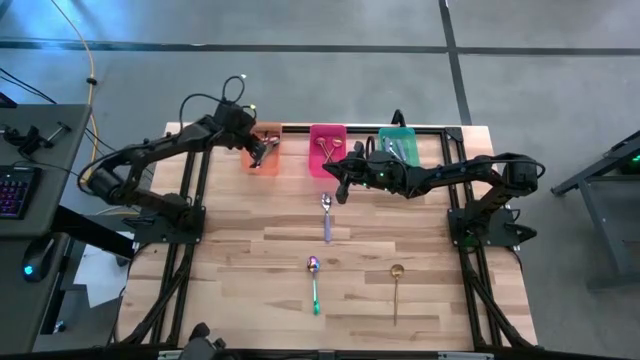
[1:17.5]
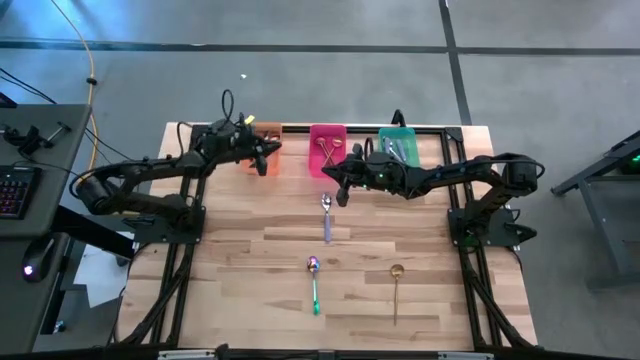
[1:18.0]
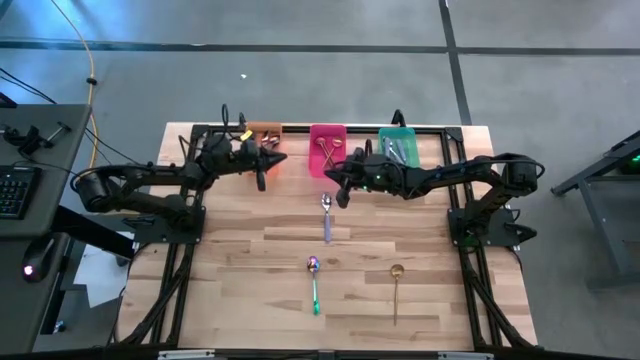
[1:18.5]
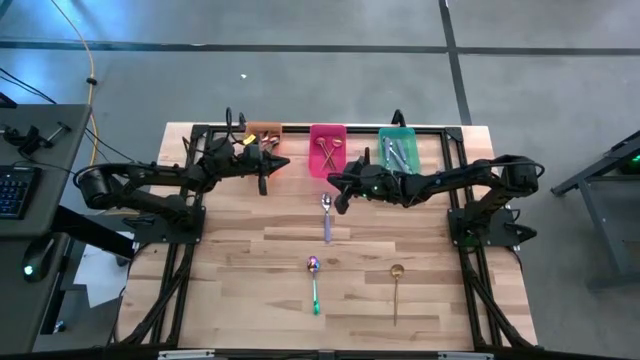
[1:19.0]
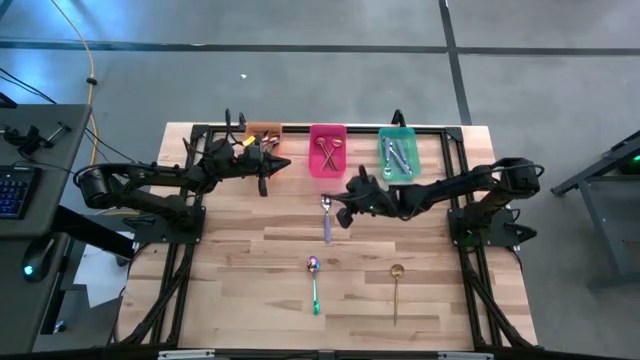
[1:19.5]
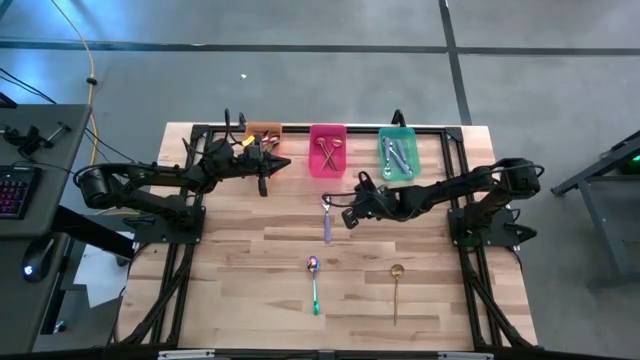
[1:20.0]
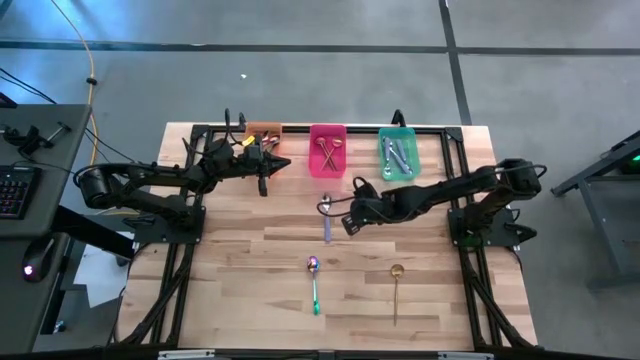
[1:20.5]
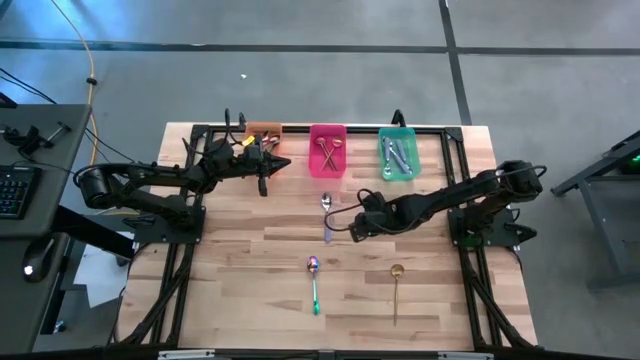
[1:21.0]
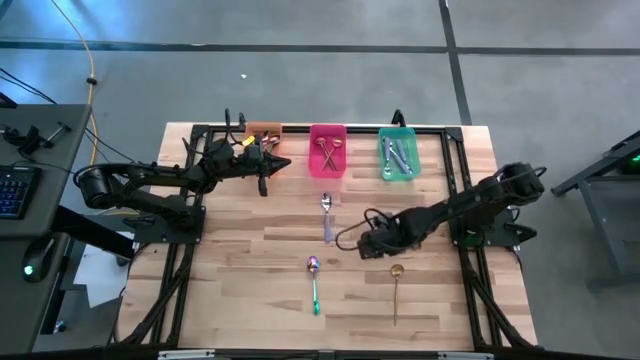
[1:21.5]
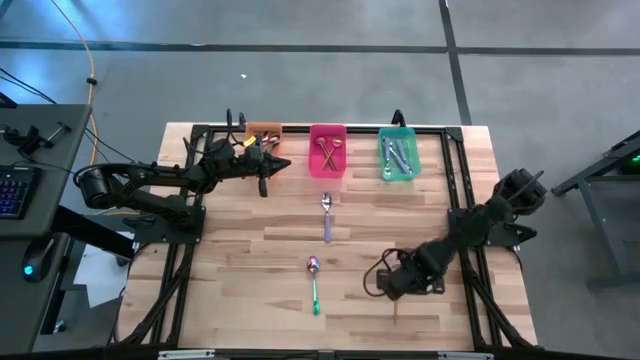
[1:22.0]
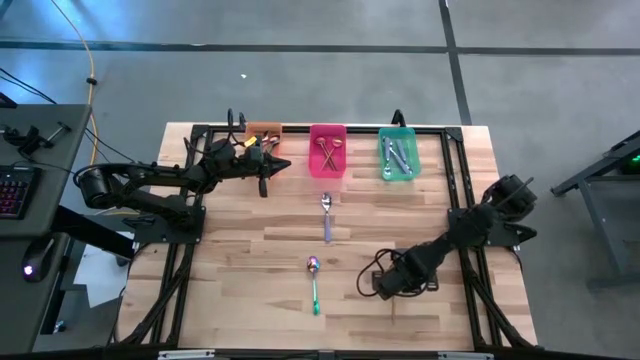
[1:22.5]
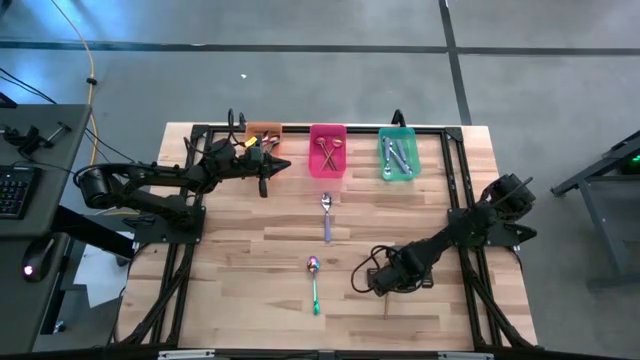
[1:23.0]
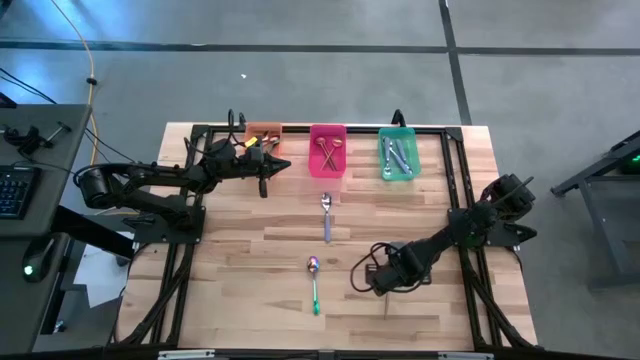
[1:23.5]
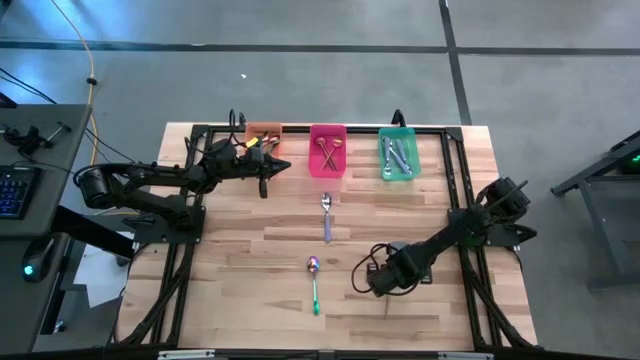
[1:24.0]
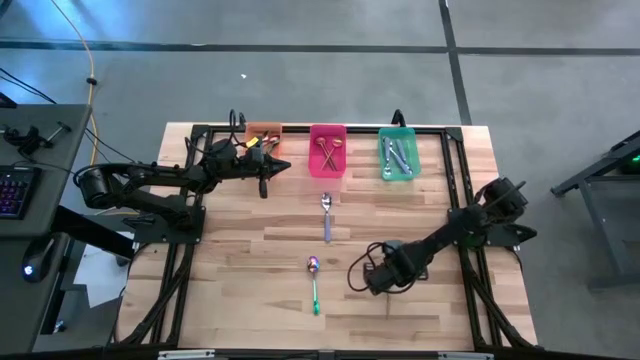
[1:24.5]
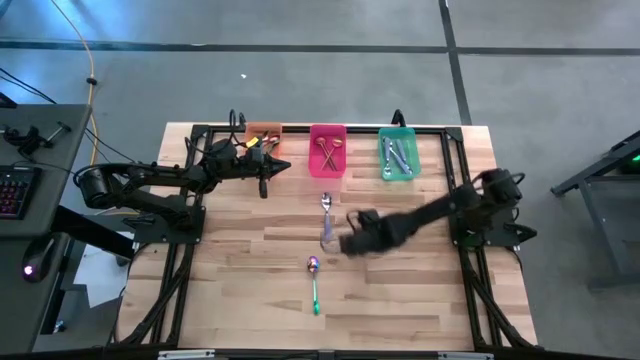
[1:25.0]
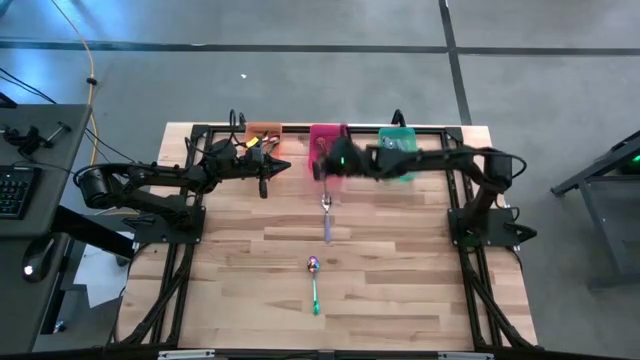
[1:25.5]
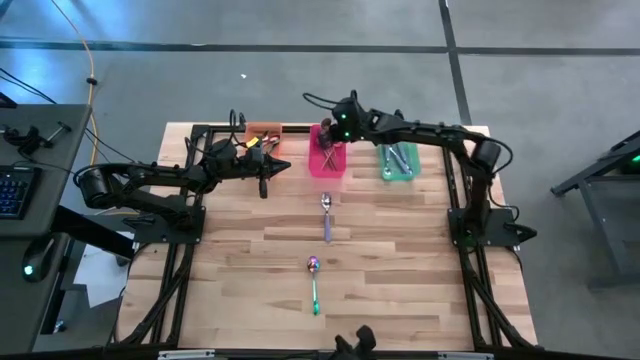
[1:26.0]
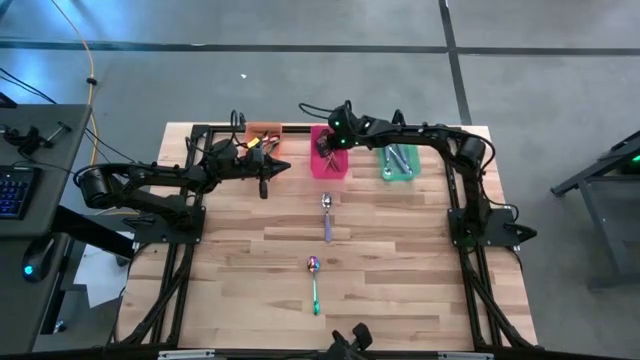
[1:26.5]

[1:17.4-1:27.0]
Task: Sort silverware by color (type)
Put the yellow spoon into the pink bin

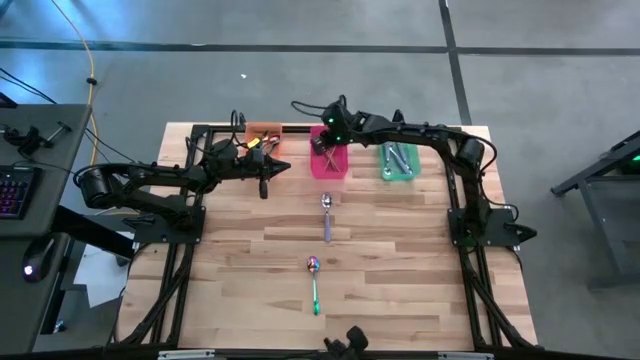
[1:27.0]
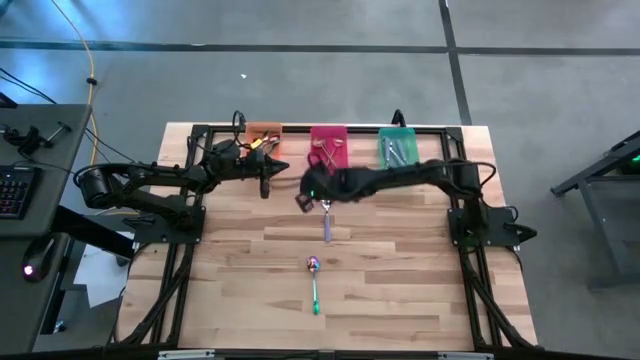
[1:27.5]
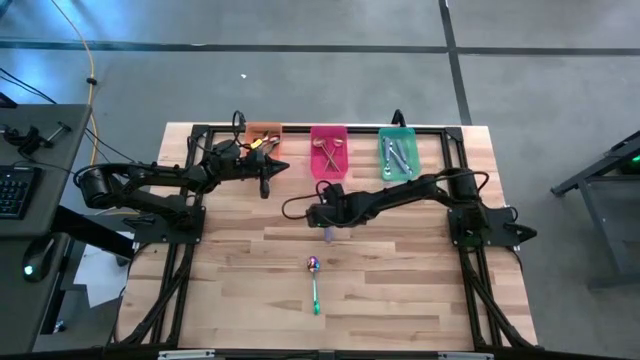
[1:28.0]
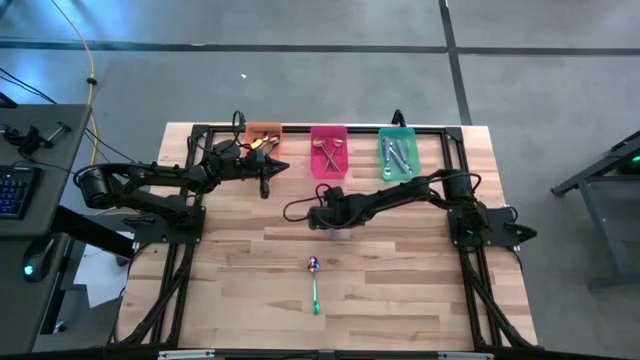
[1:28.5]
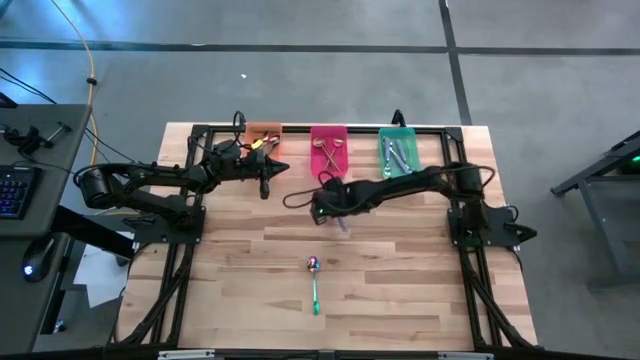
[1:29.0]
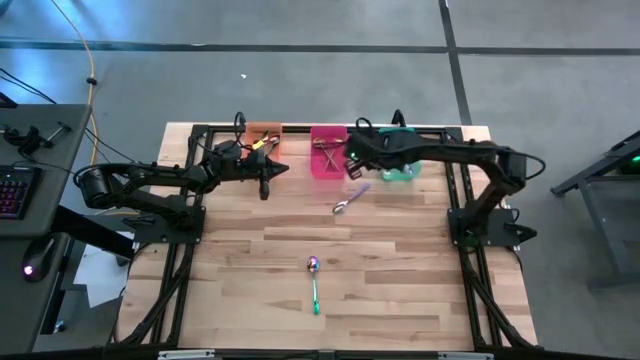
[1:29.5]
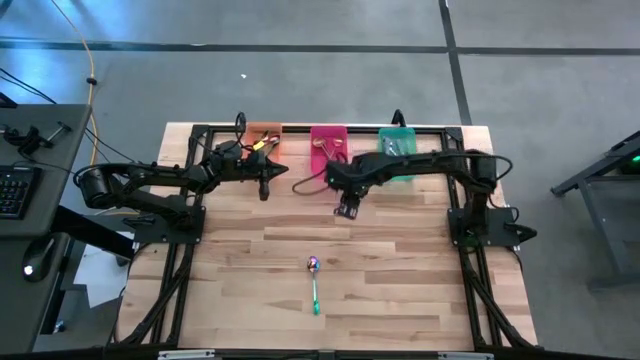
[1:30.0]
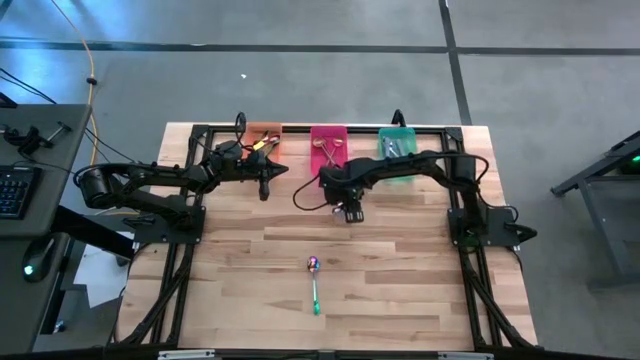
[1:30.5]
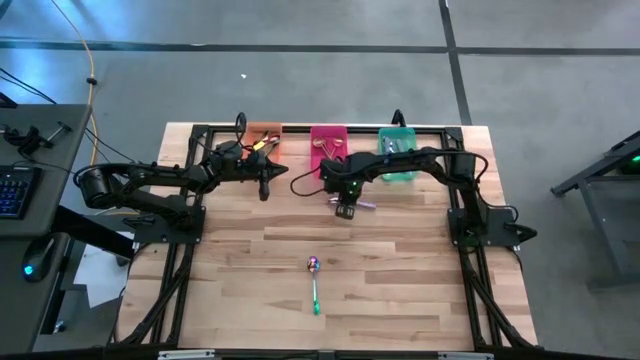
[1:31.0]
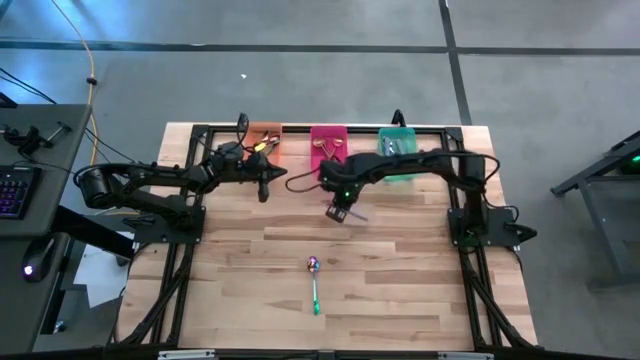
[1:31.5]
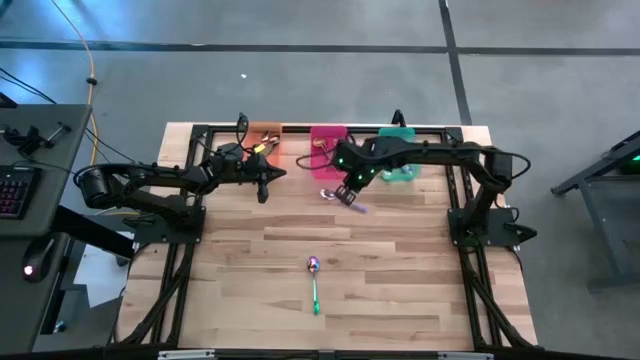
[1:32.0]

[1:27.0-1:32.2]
Put the purple spoon into the green bin

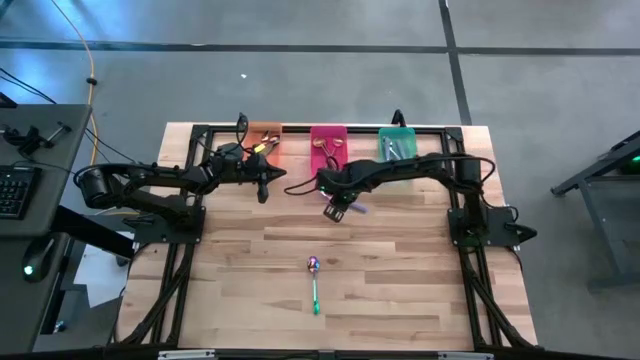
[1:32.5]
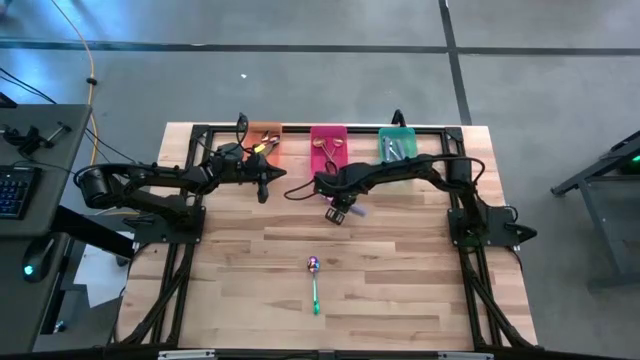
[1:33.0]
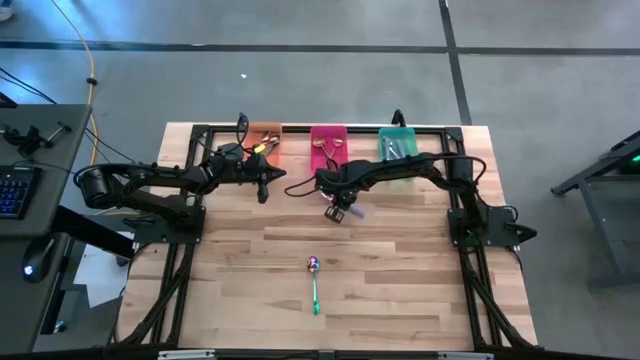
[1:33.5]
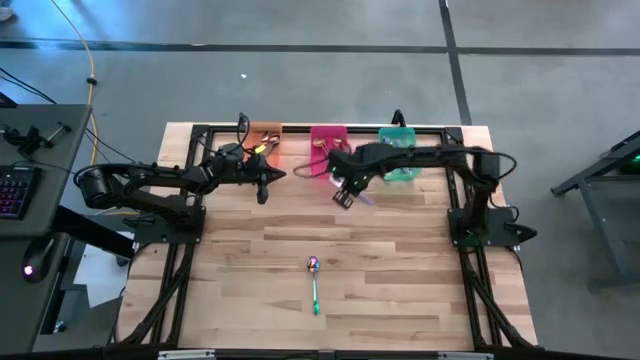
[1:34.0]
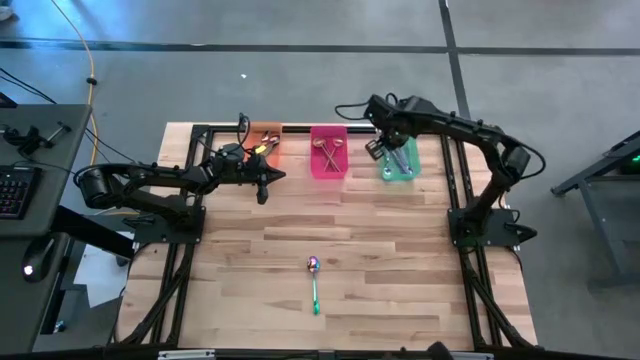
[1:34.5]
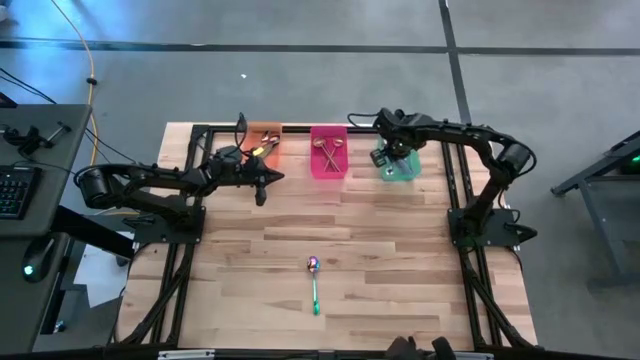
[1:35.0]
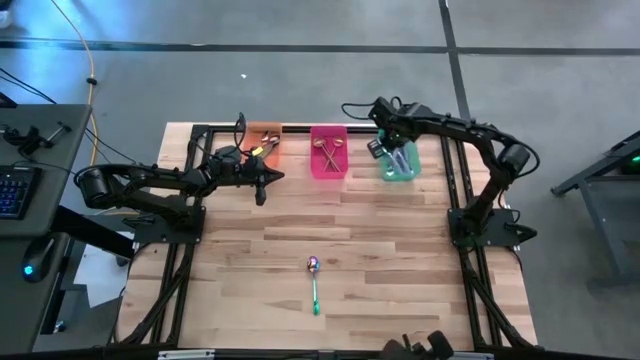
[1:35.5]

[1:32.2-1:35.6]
Put the purple spoon into the green bin

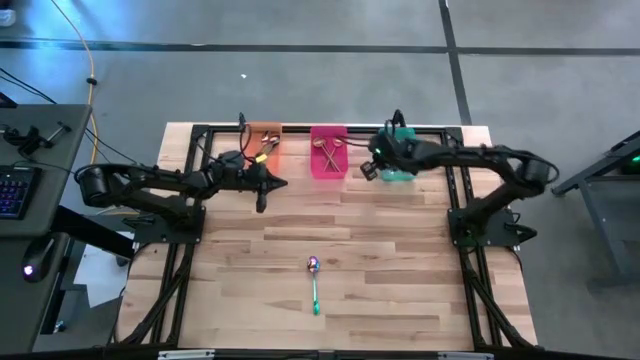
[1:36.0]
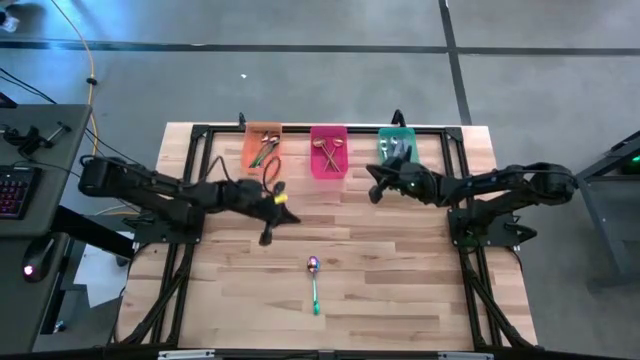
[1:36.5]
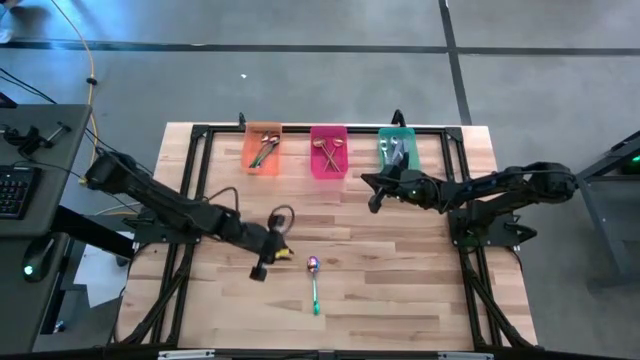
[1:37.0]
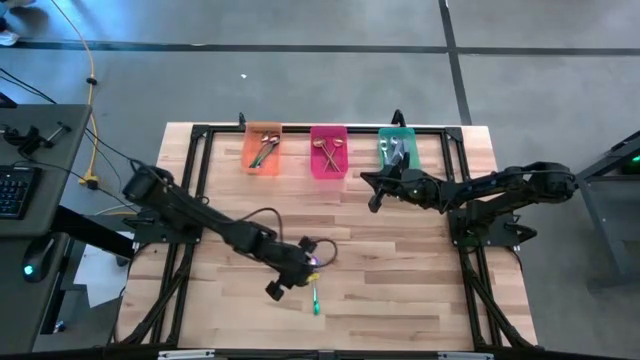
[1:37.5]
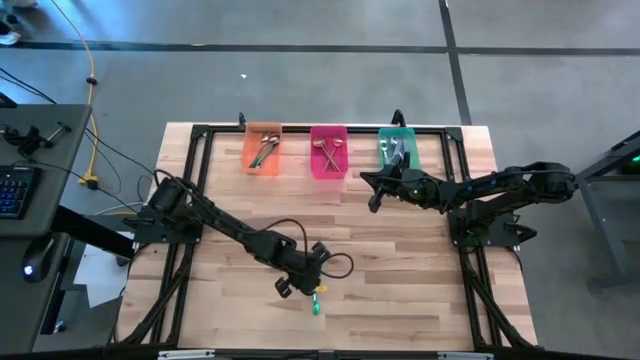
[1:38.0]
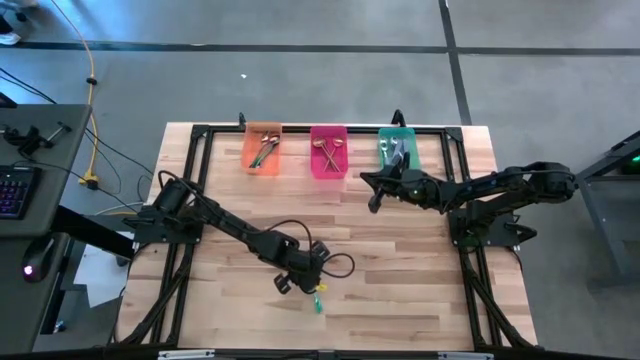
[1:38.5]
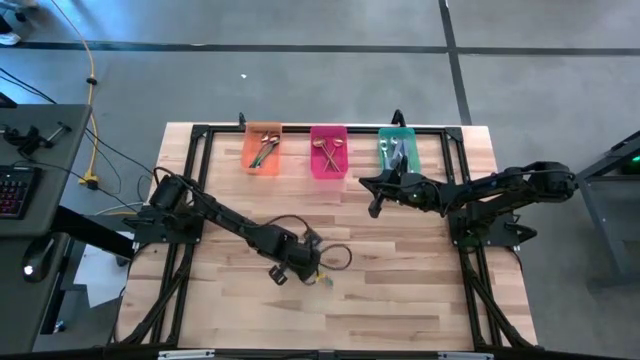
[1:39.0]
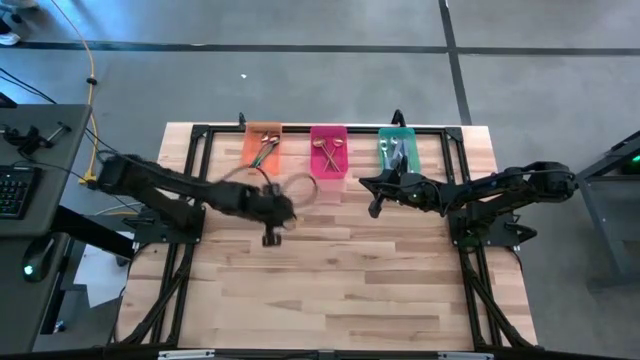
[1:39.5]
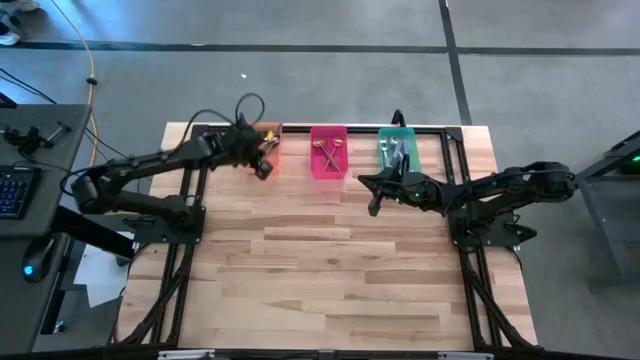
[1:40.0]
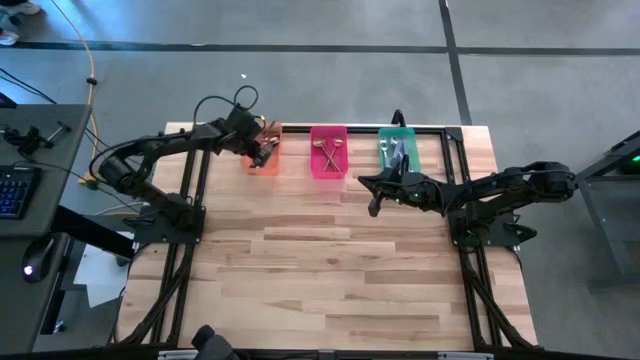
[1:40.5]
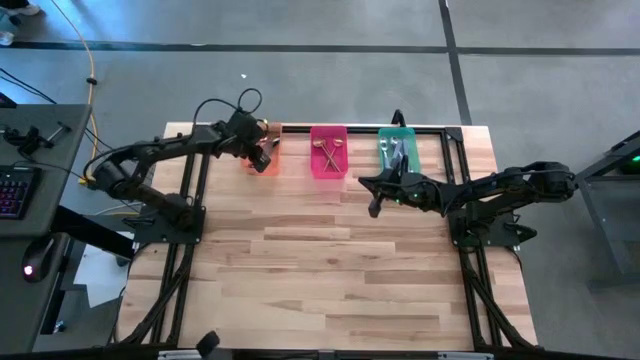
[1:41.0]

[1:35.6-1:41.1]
Put the iridescent spoon into the orange bin
